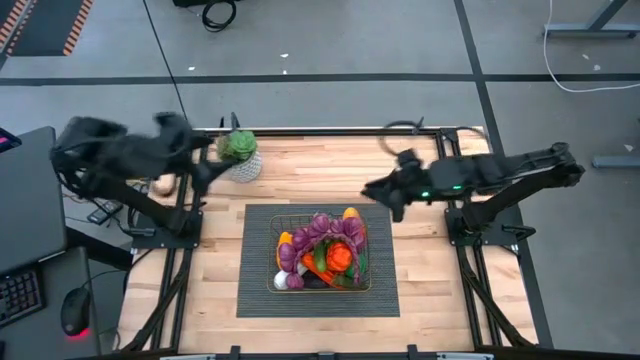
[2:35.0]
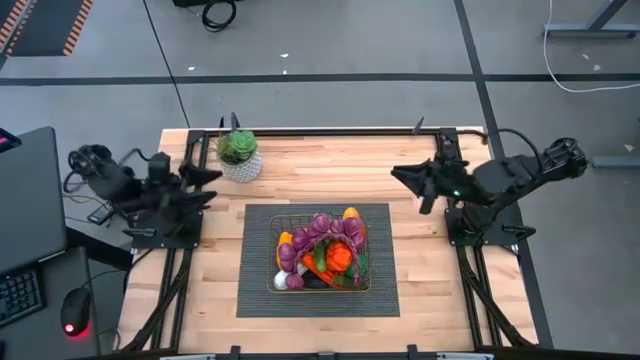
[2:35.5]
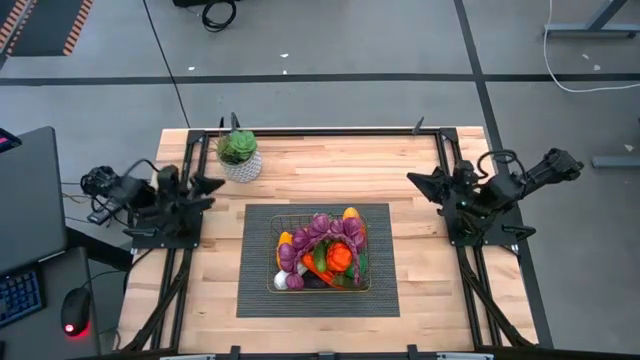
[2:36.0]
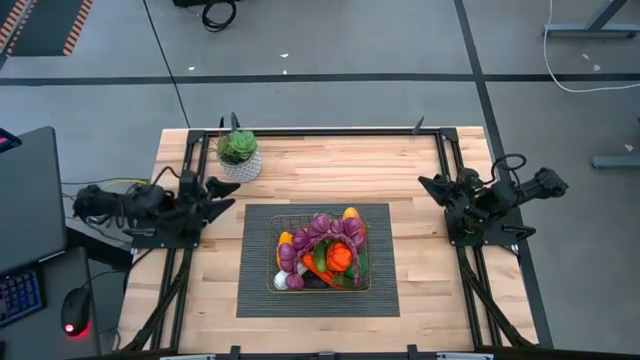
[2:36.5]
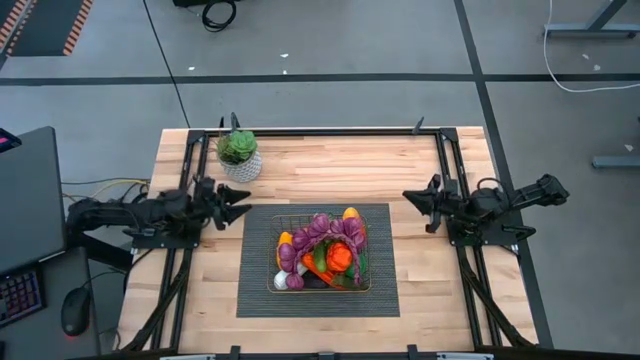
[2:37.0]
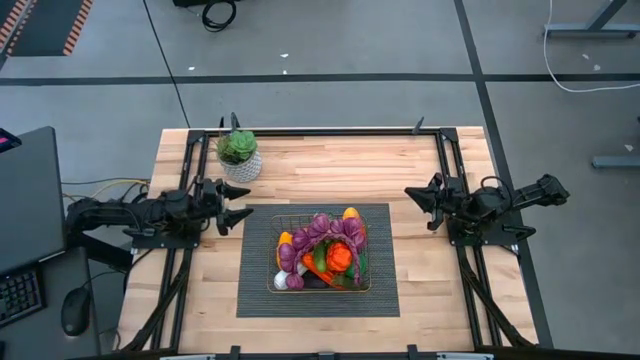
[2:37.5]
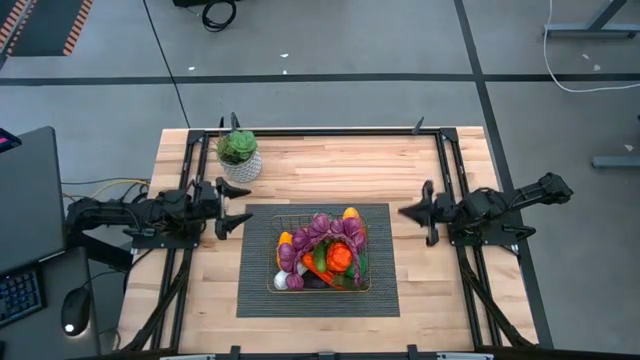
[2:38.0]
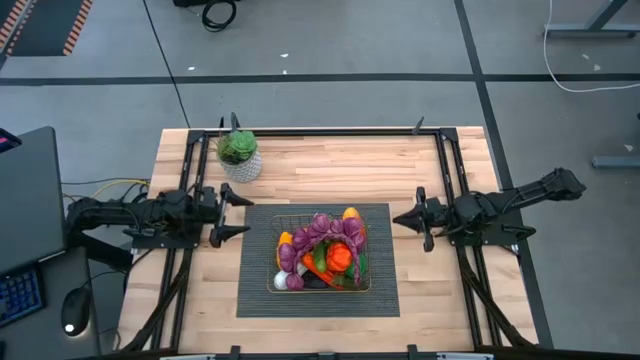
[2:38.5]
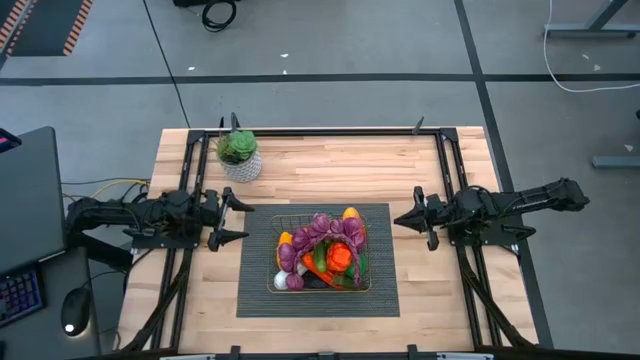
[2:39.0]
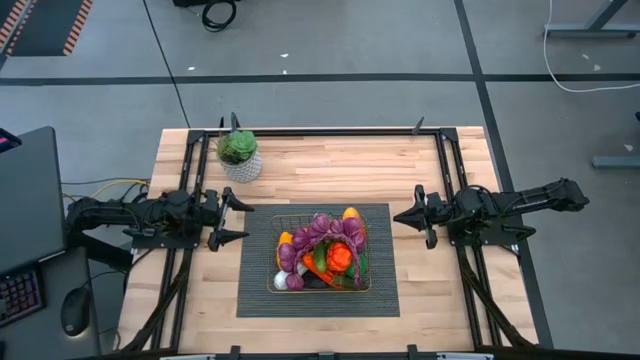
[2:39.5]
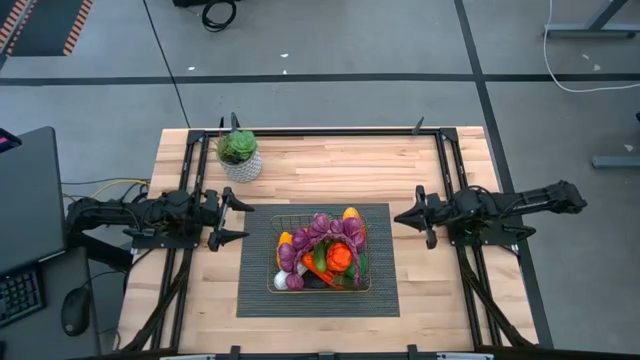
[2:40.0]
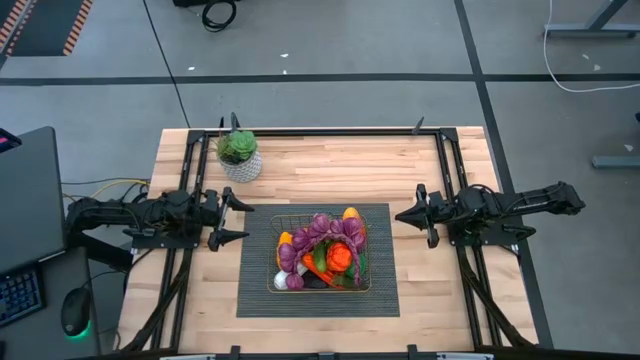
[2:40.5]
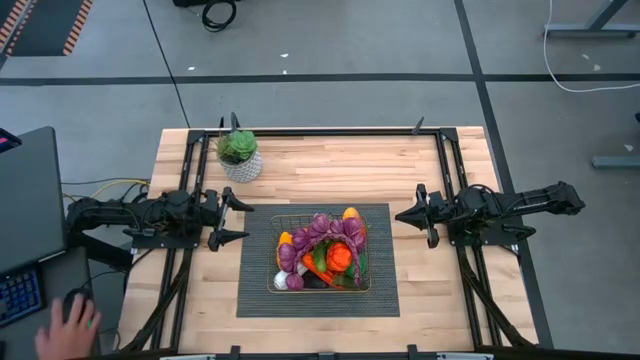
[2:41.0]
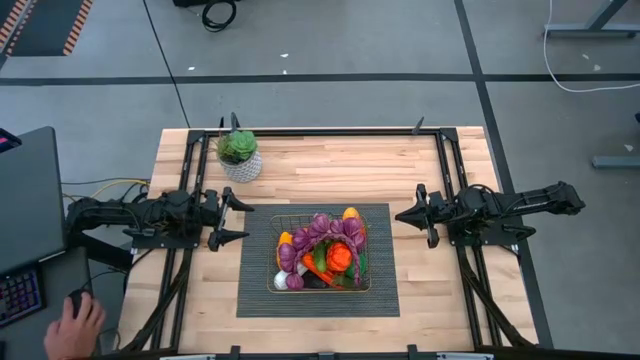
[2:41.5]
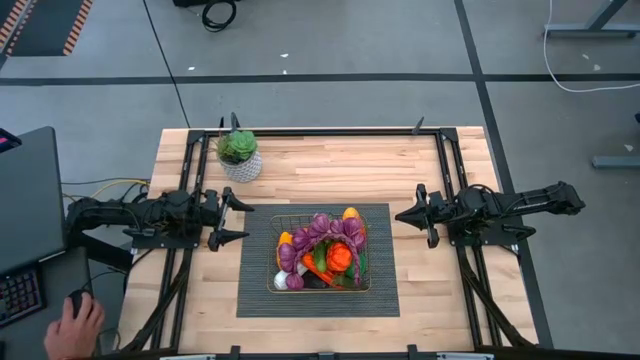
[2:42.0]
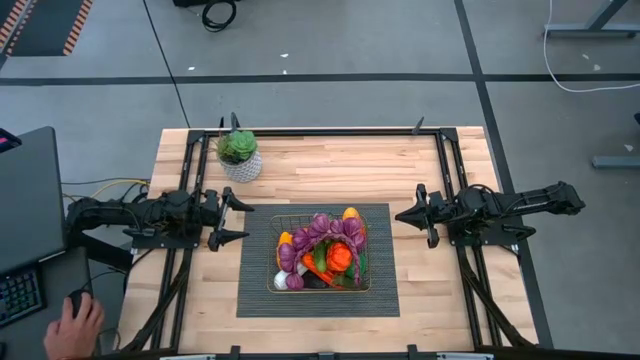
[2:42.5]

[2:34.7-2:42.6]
Task: Build produce basket
Return to Home Position

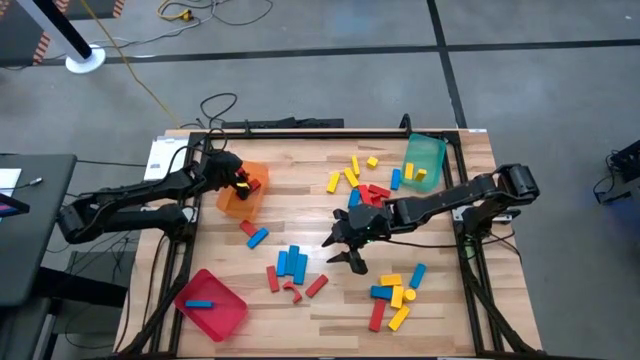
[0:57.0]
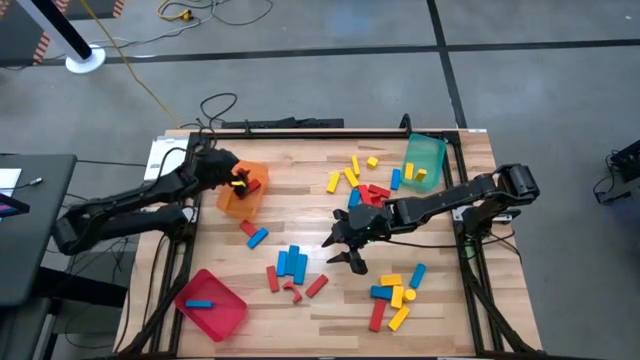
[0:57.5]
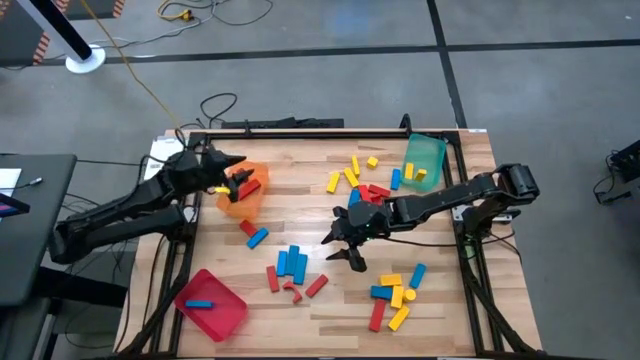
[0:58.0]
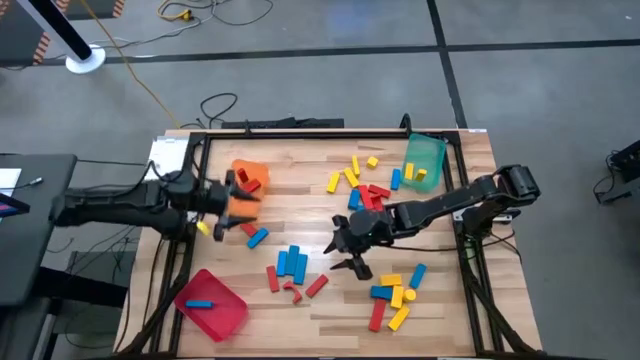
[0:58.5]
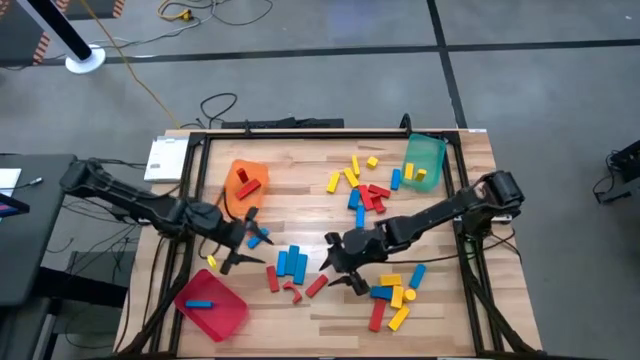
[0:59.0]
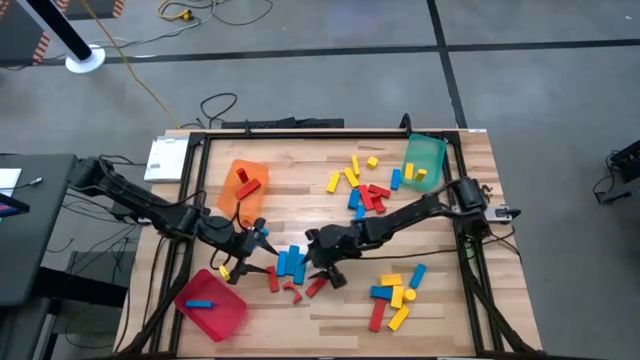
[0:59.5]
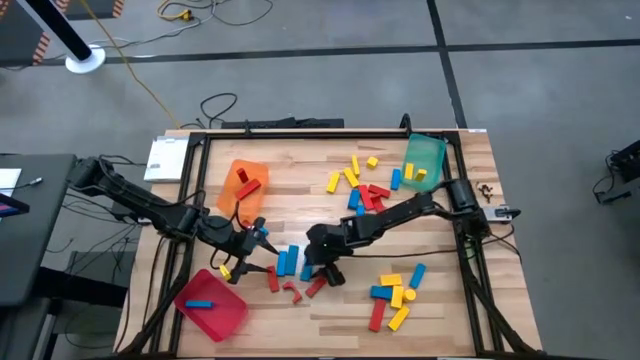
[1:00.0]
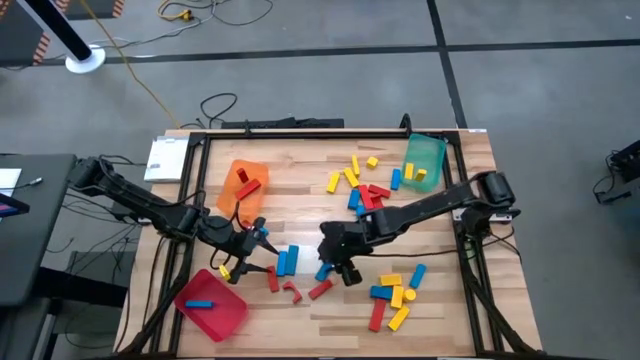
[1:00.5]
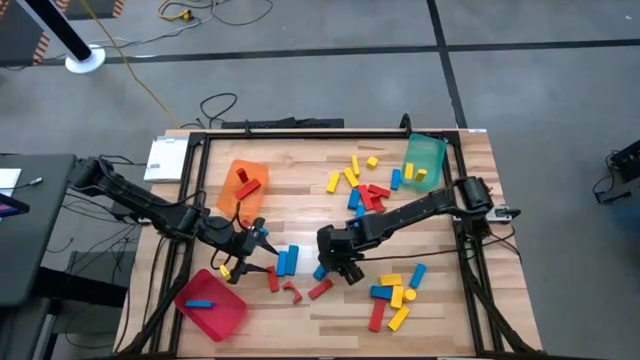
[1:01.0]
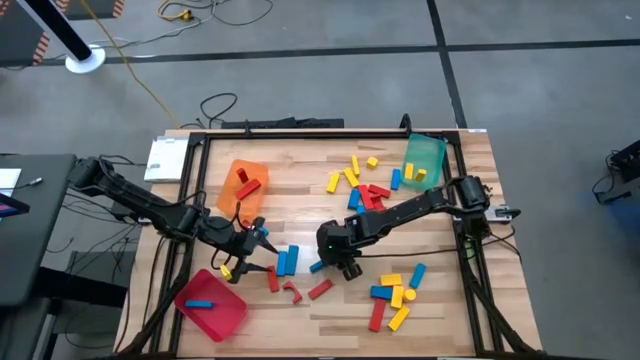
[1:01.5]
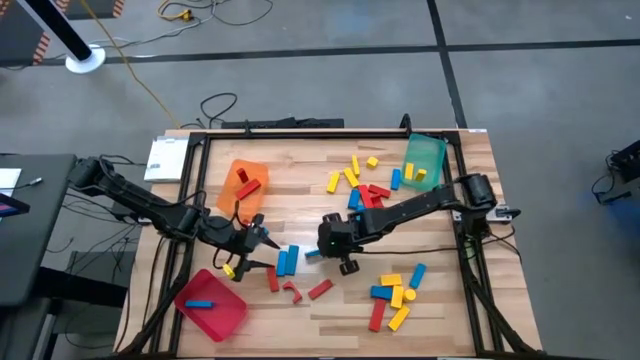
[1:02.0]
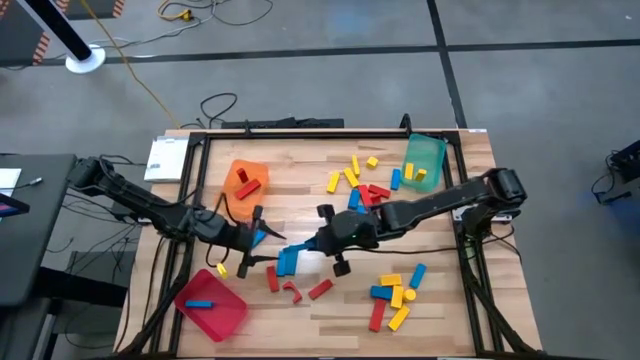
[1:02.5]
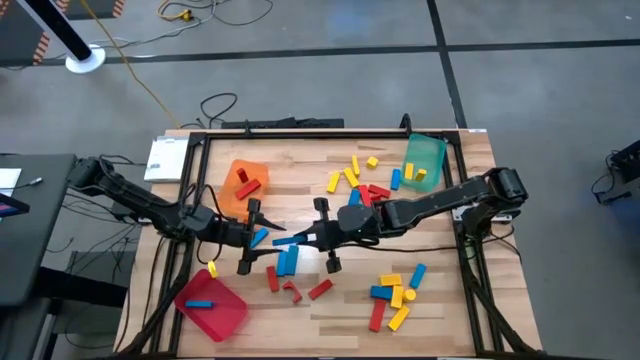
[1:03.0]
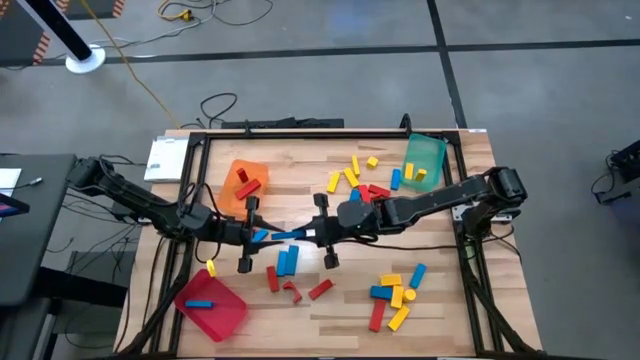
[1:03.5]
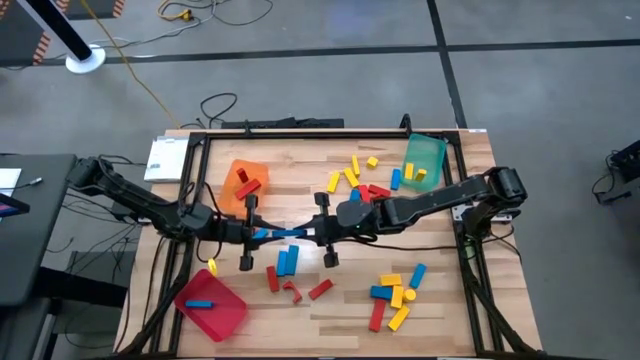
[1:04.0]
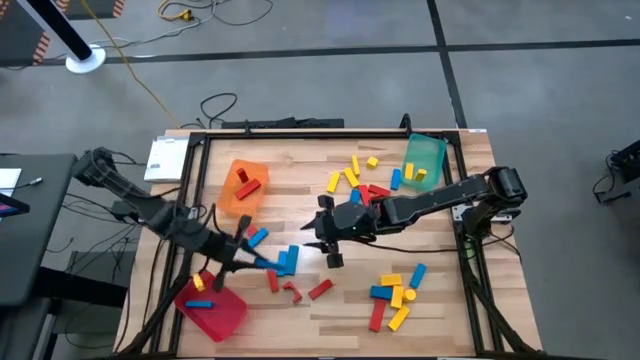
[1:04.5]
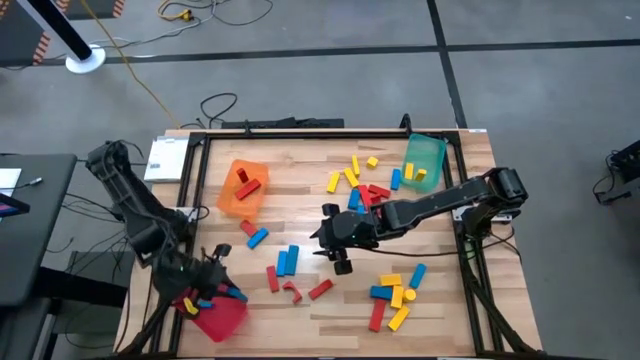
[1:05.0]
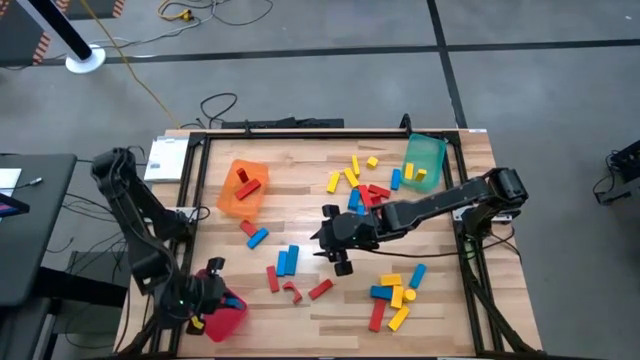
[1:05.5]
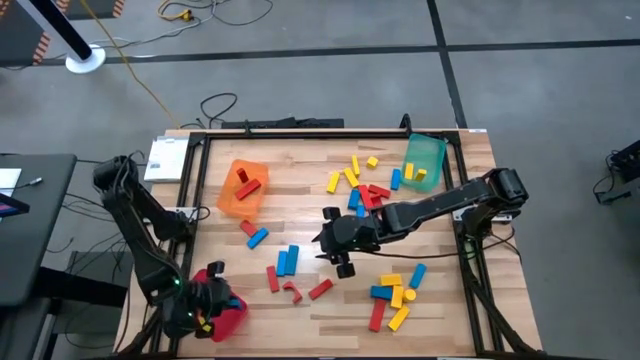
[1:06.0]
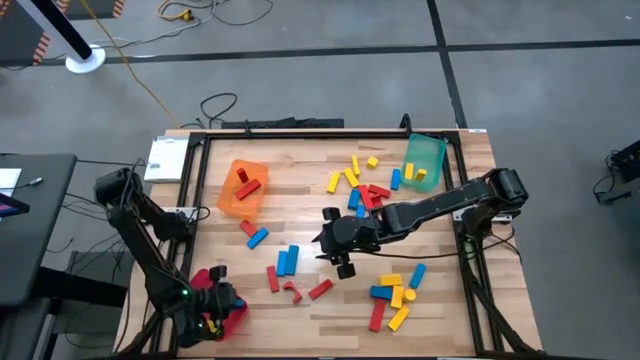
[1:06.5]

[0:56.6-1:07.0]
Task: Sort blocks
Put the blue wooden block into the red bin

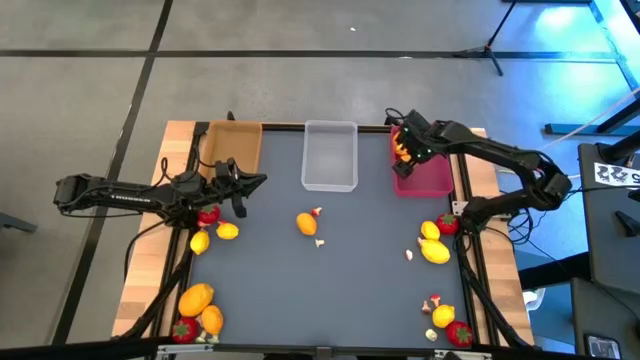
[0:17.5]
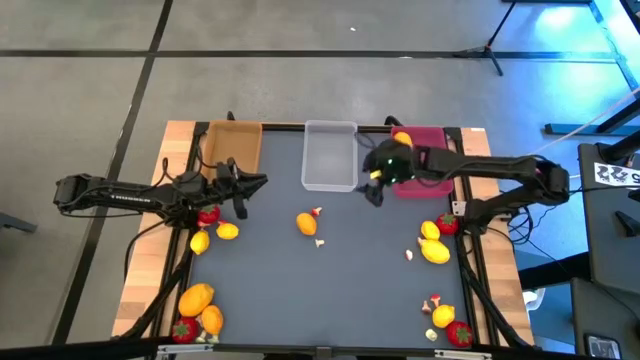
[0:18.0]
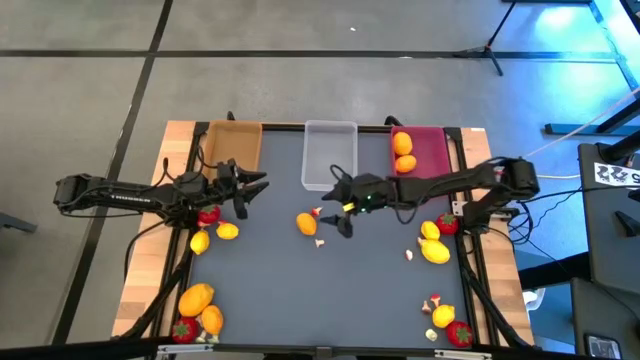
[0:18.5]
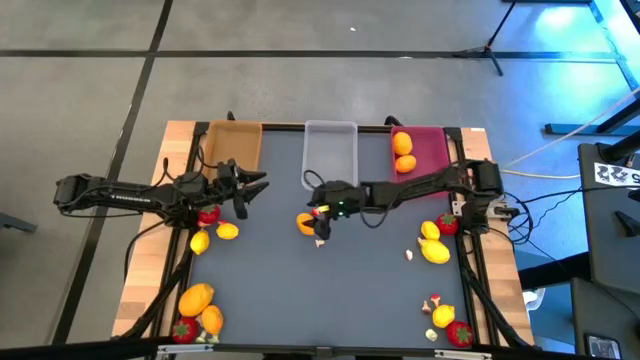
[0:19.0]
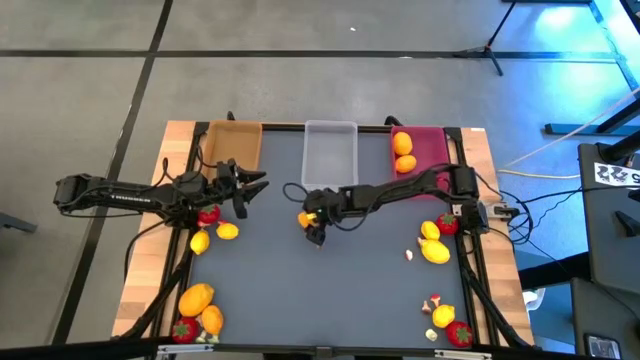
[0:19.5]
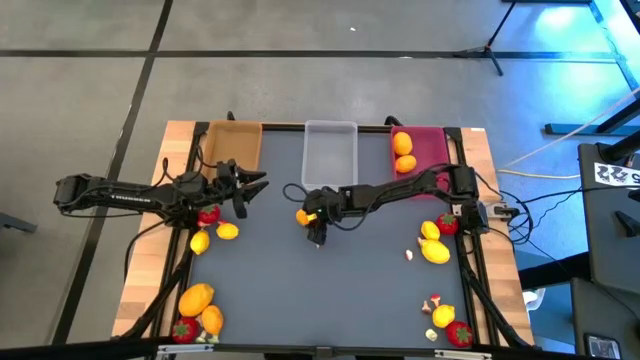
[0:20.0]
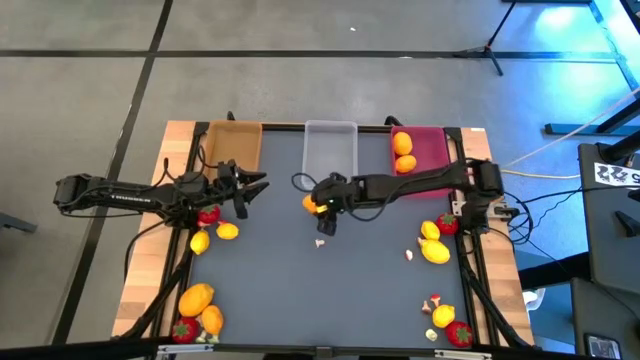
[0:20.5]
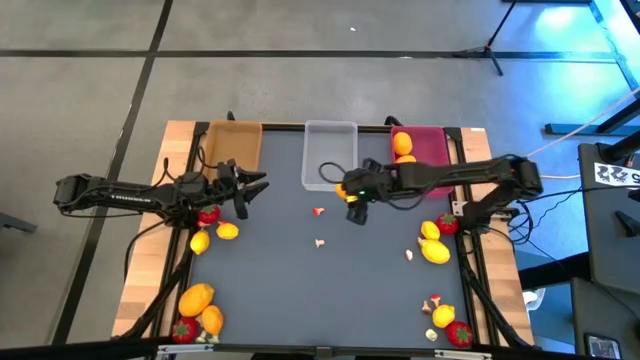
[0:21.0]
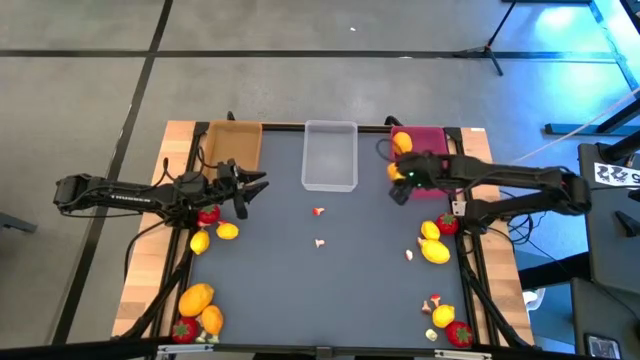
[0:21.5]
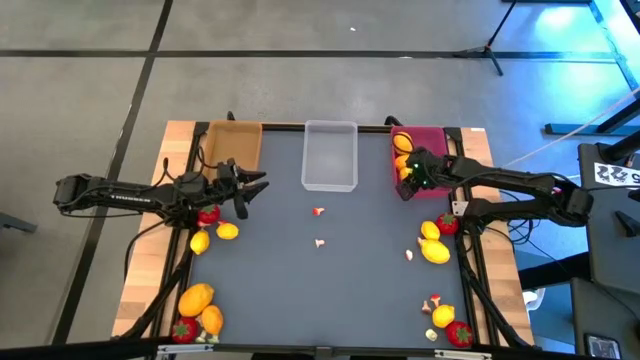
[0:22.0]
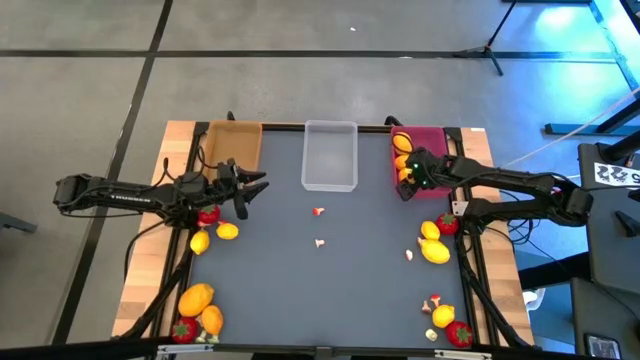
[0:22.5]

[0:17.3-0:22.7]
Task: Sort produce into baskets
Put the lemon into the pink bin
